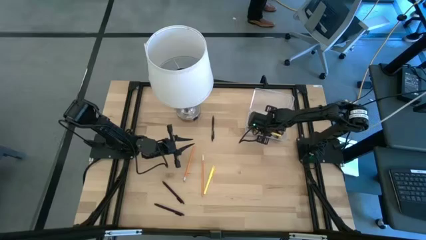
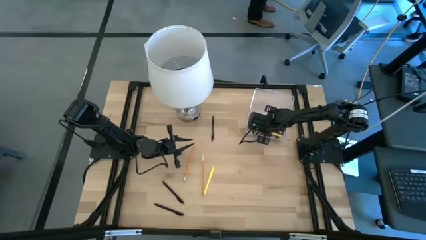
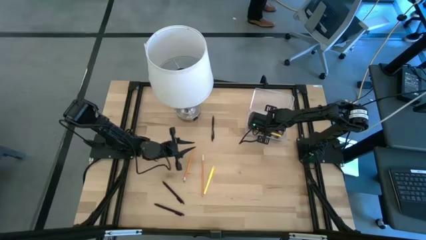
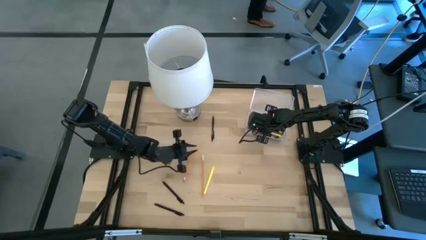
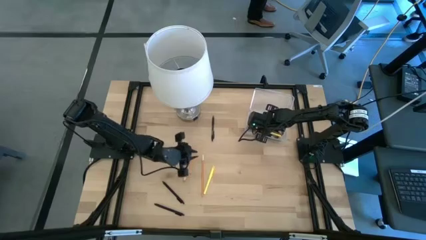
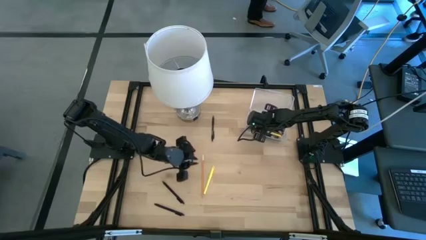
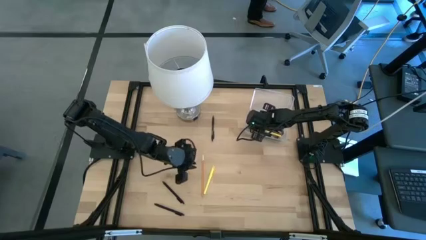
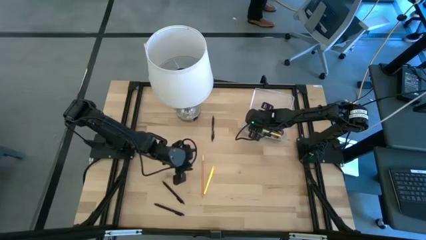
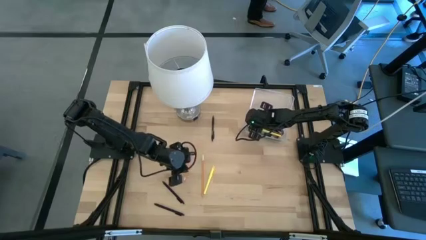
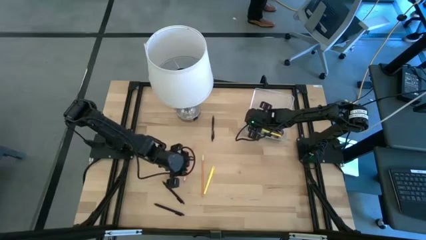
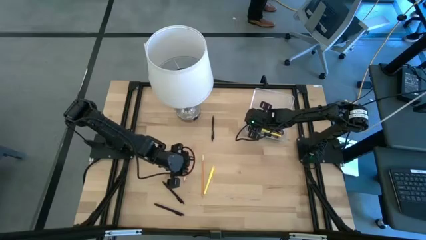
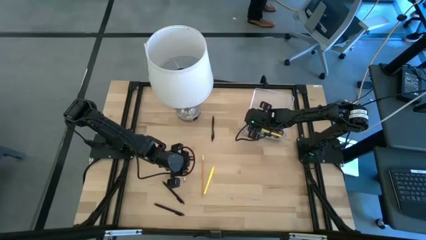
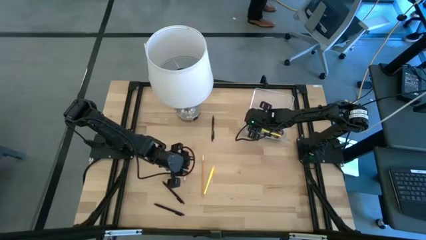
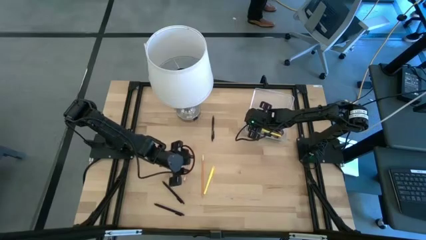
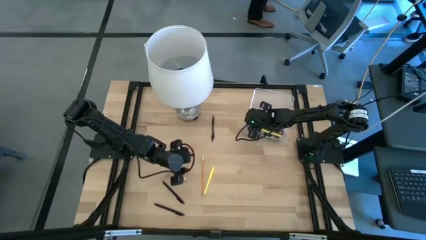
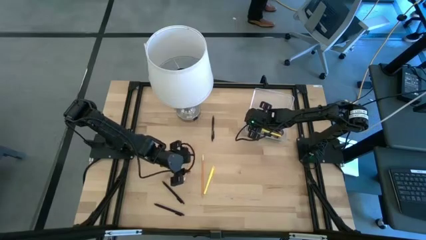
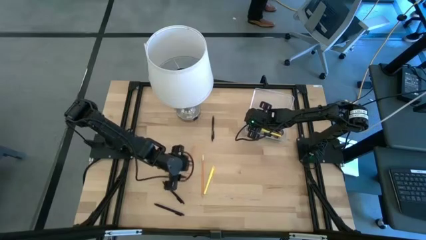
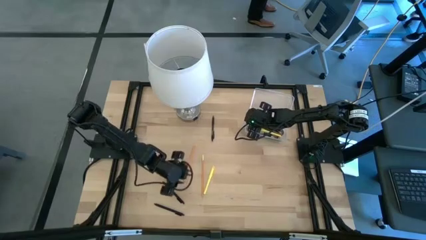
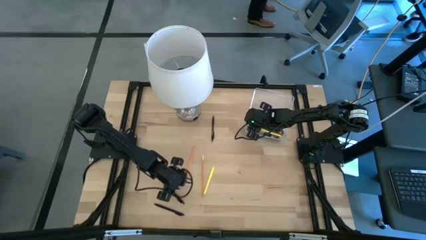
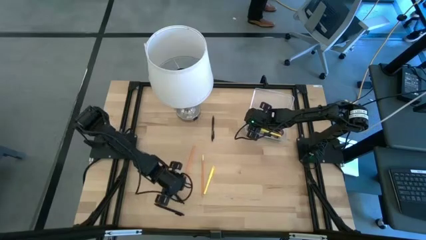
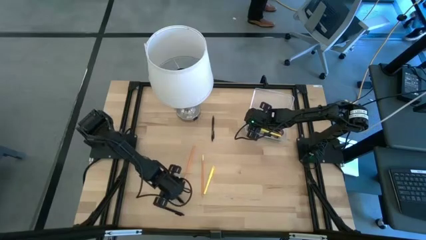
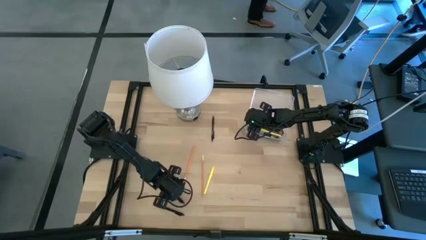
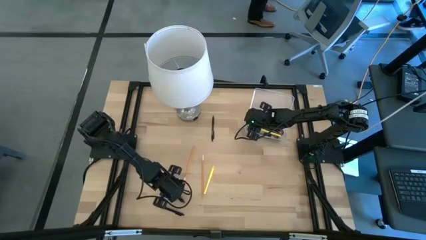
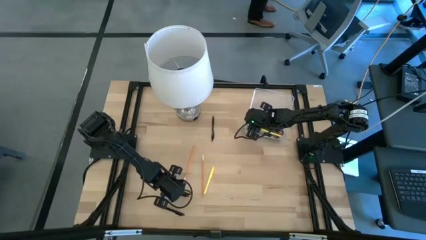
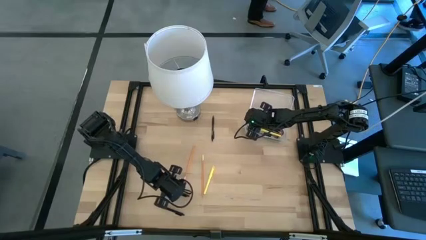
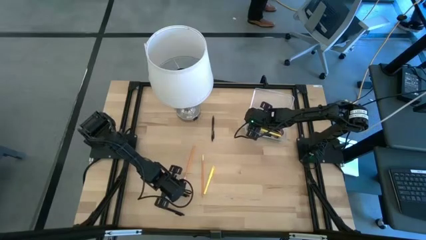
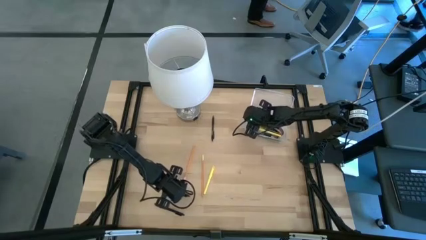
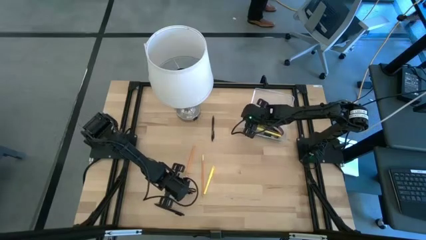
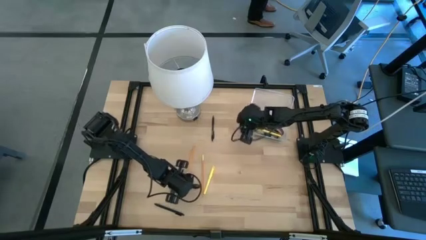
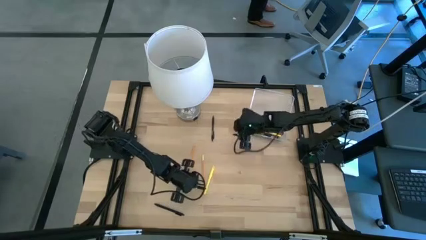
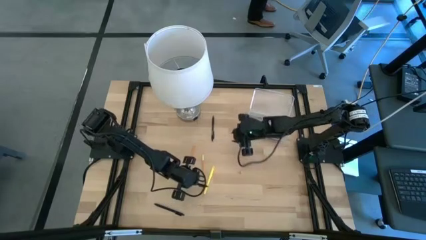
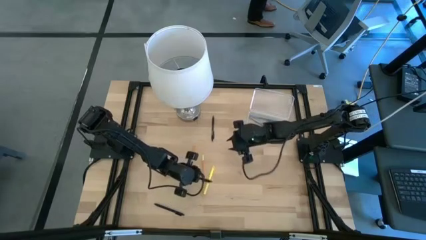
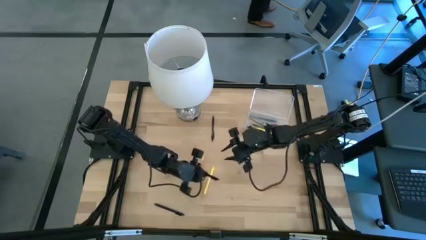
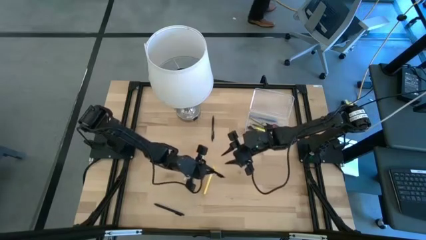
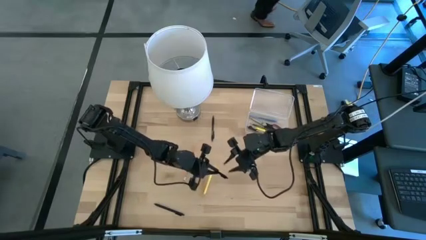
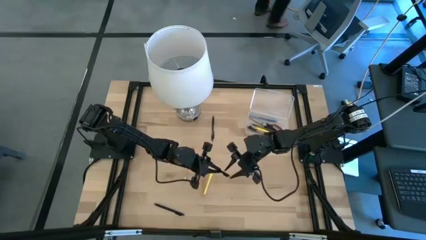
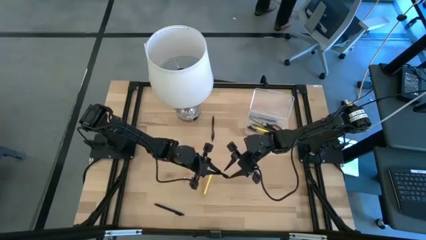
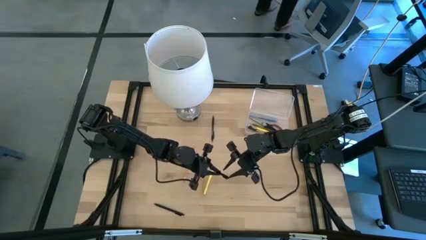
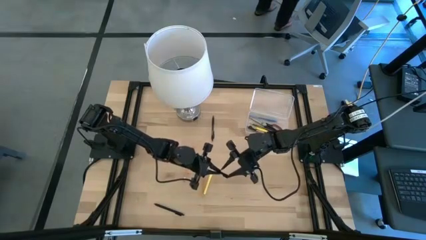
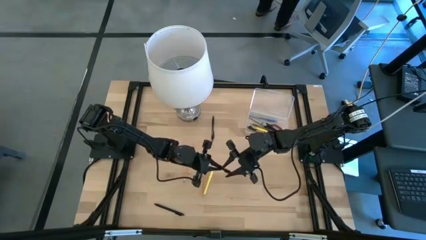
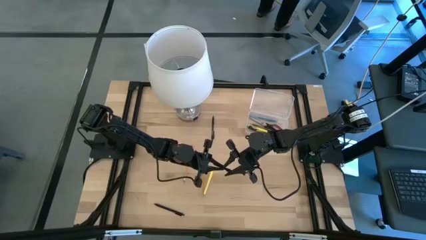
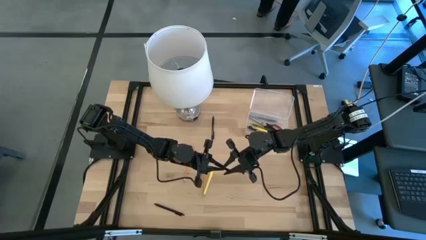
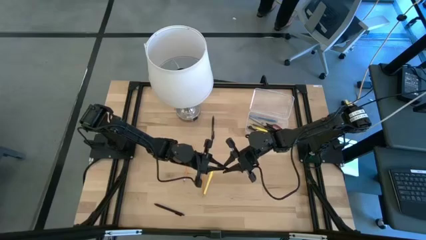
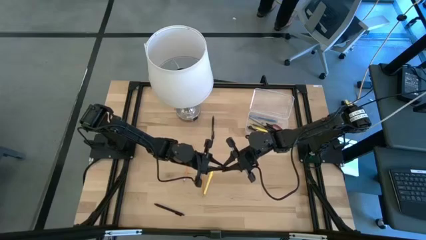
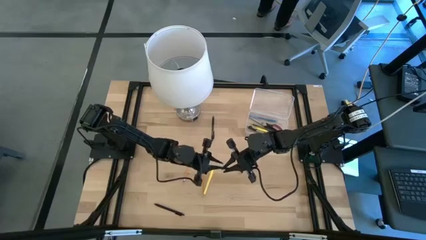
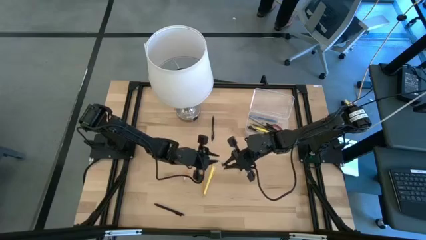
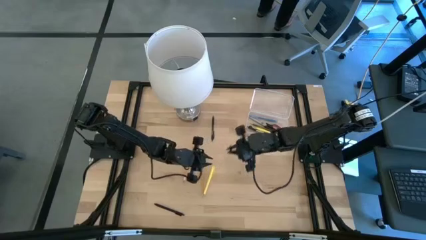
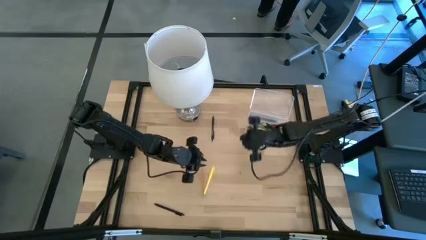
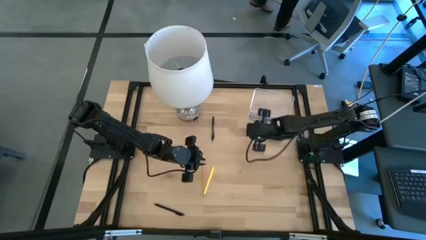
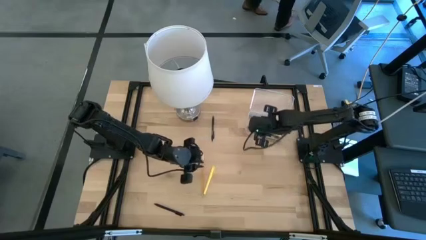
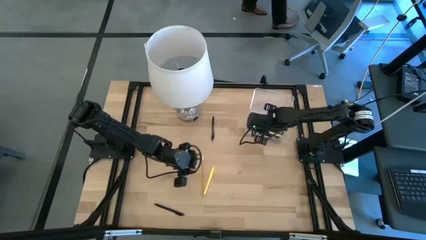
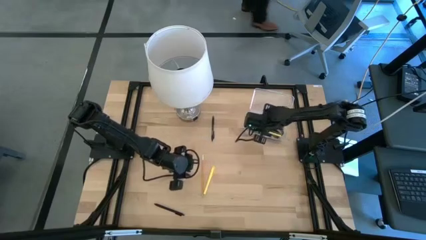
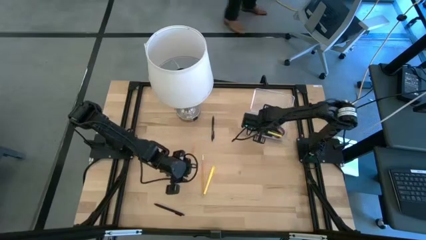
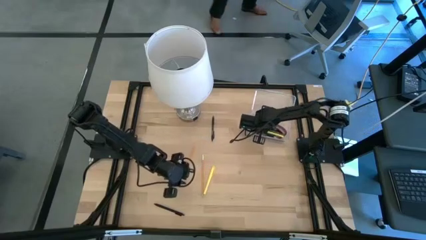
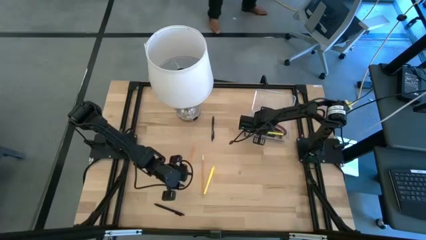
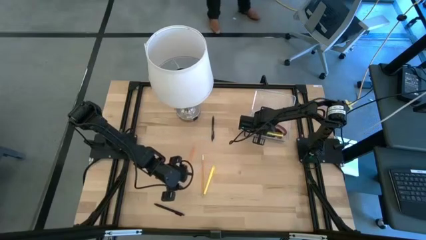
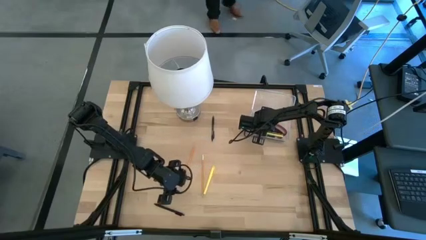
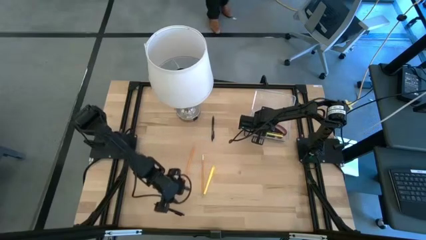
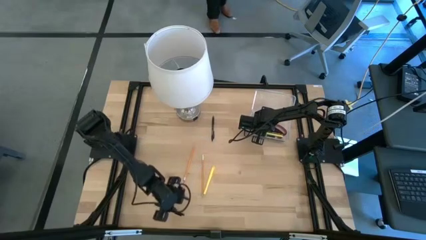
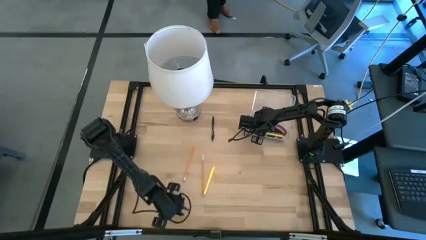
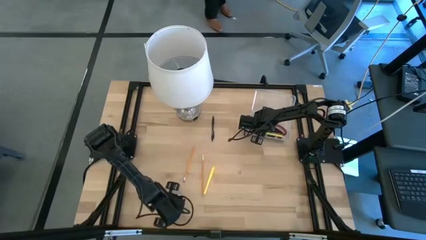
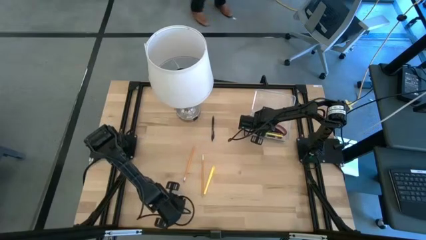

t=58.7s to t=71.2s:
Task: Pick & place school supplies into a supply box
Put the black pen into the transparent supply box

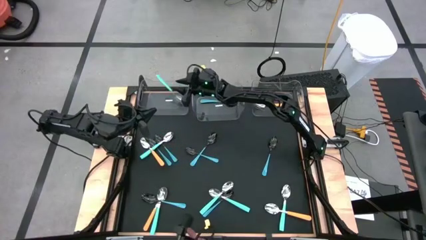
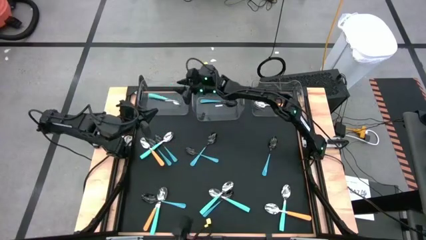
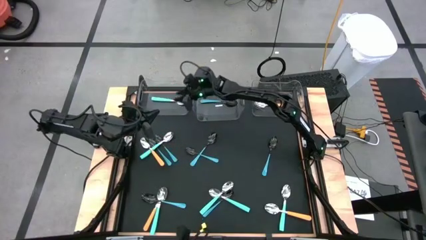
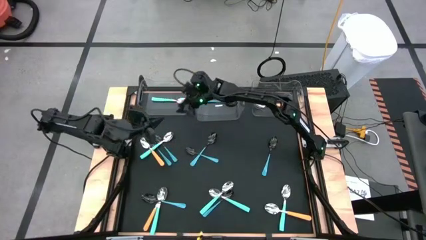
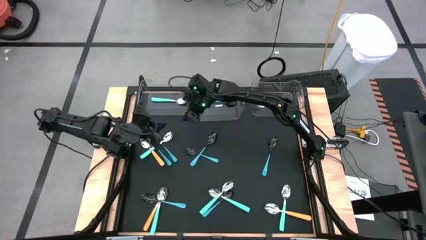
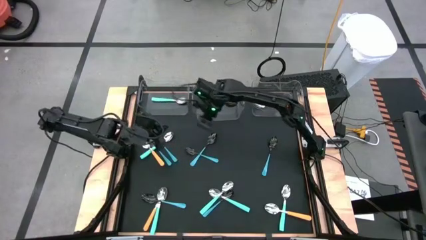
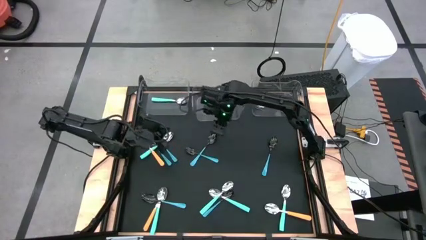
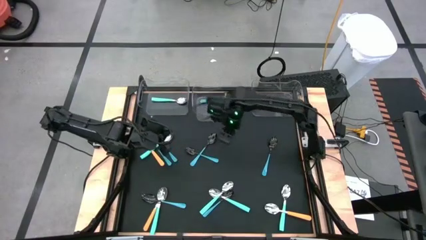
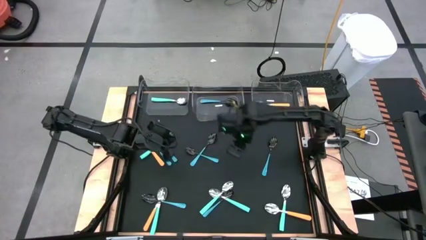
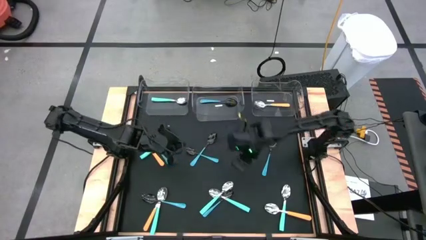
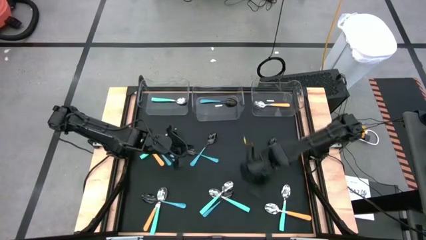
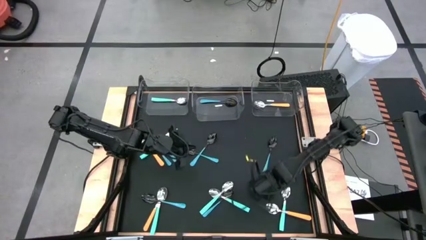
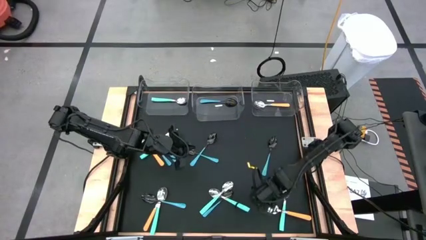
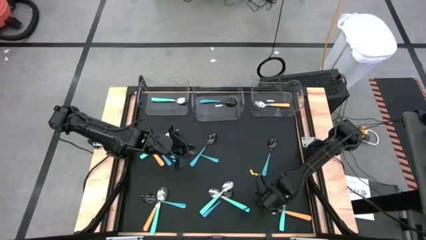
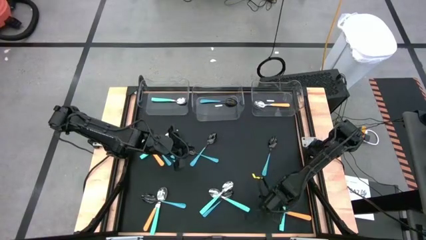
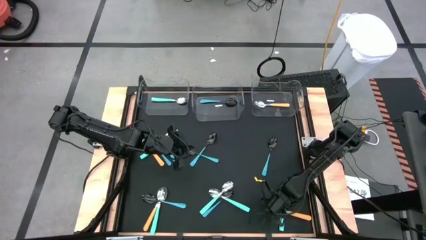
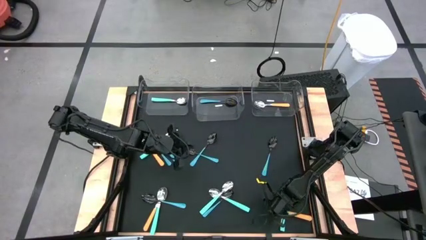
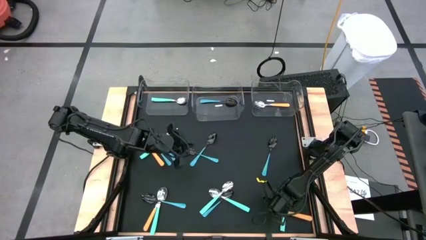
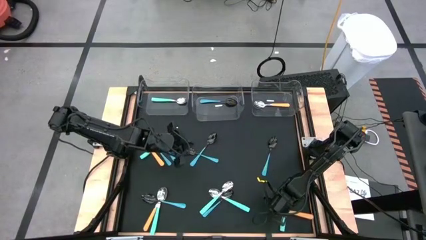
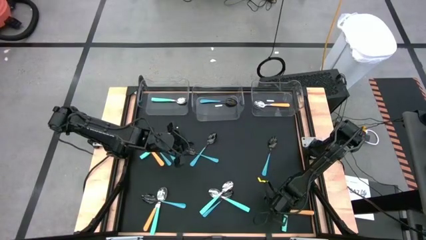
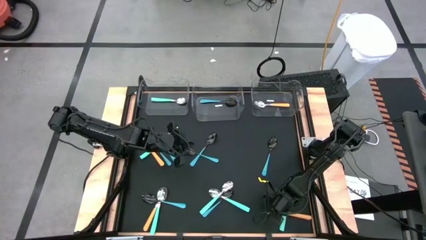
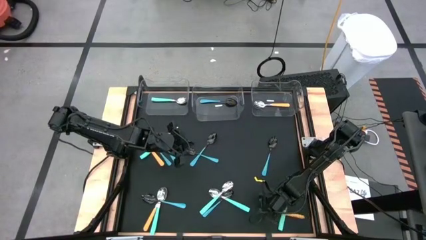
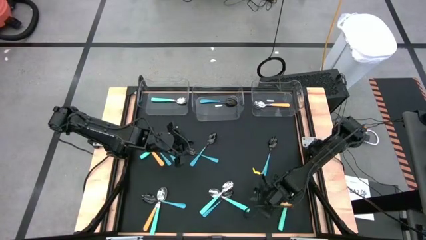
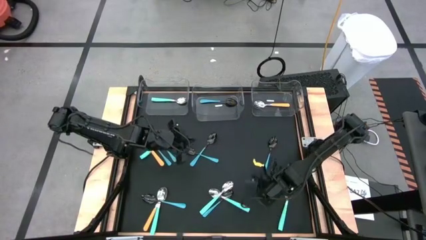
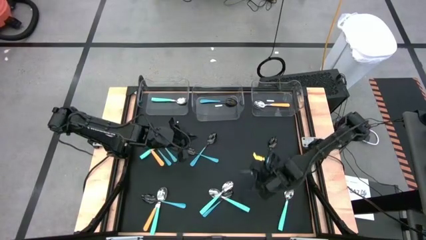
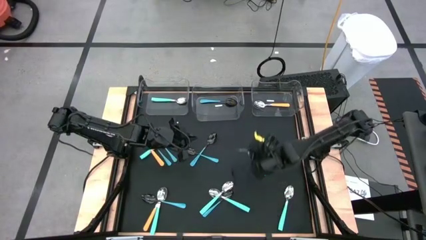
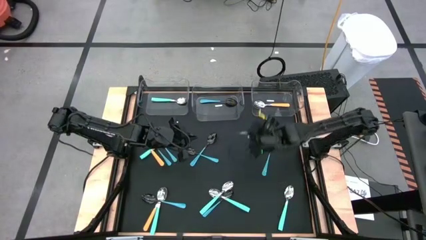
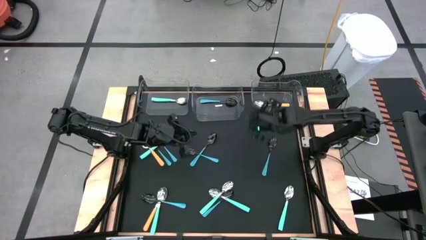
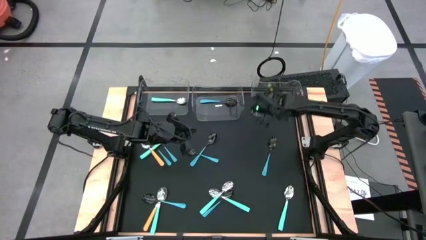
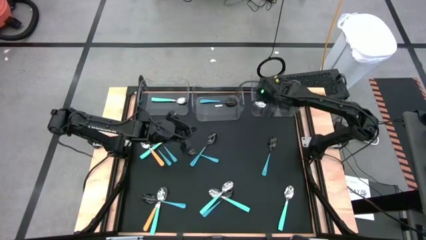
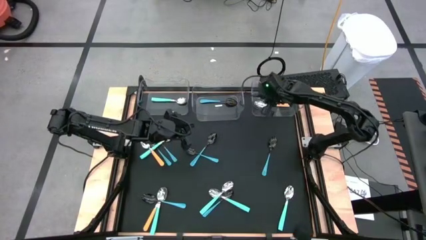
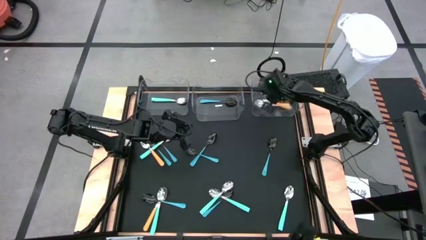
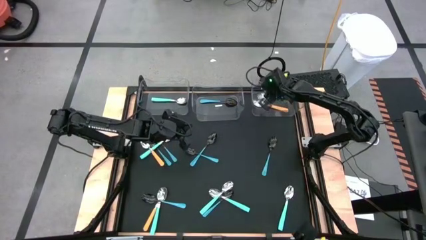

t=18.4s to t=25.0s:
Task: Sort silverware by color (type)
Put the orange spoon into the right transparent bin
